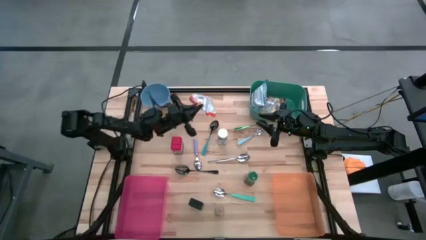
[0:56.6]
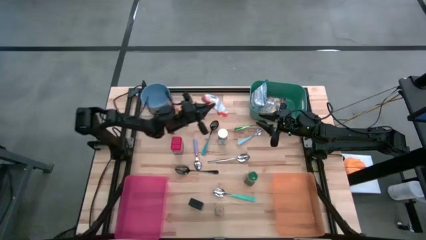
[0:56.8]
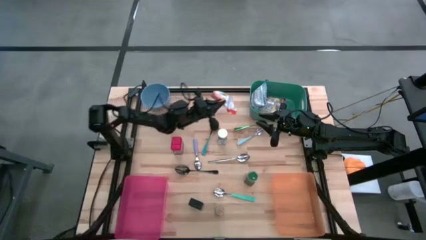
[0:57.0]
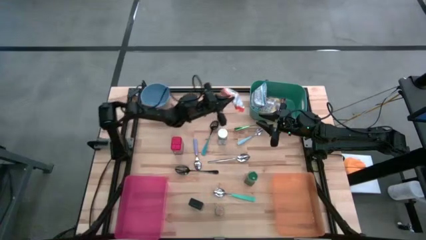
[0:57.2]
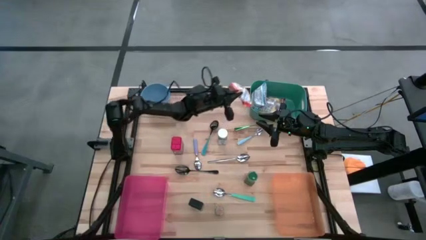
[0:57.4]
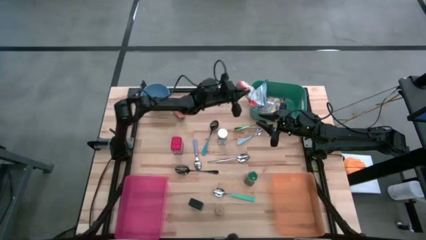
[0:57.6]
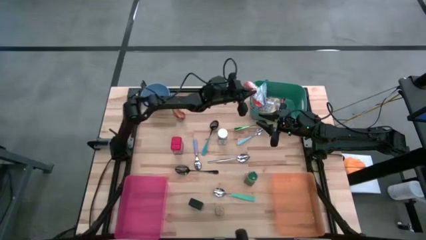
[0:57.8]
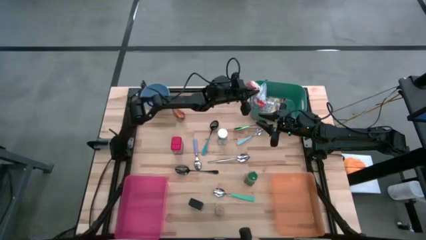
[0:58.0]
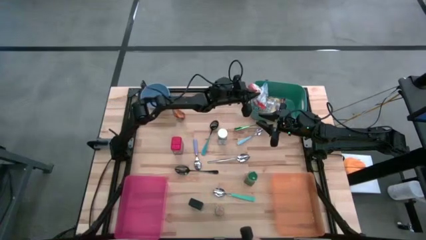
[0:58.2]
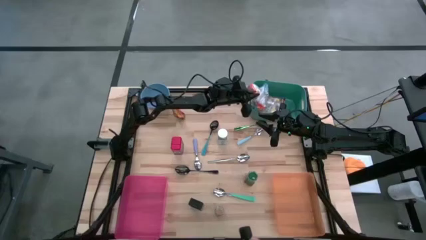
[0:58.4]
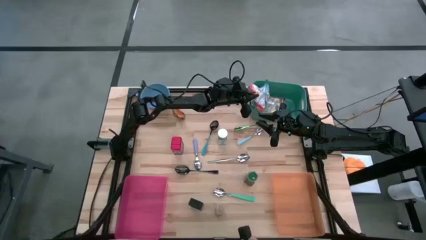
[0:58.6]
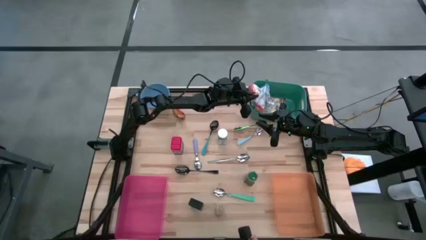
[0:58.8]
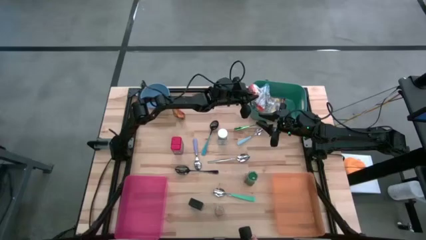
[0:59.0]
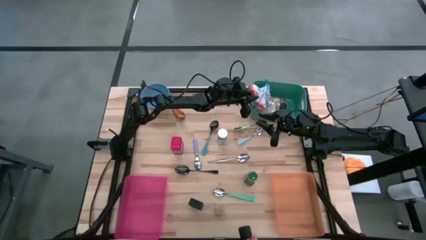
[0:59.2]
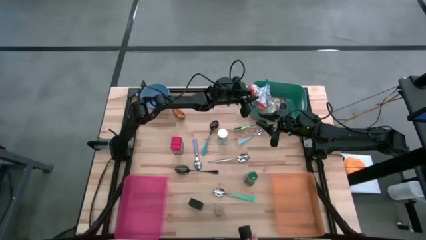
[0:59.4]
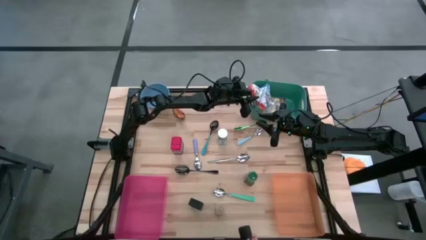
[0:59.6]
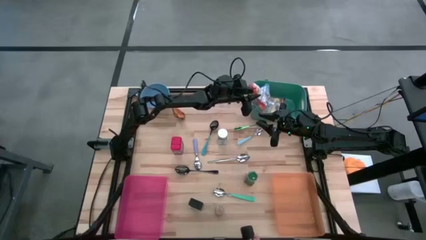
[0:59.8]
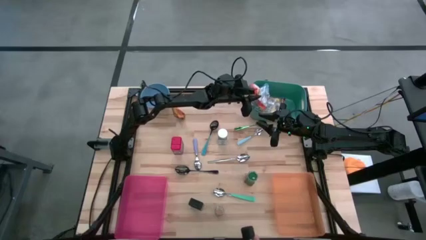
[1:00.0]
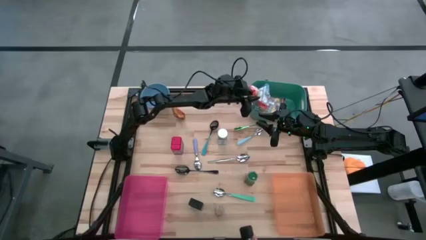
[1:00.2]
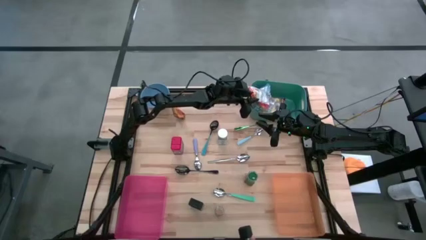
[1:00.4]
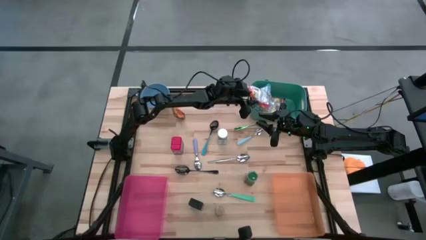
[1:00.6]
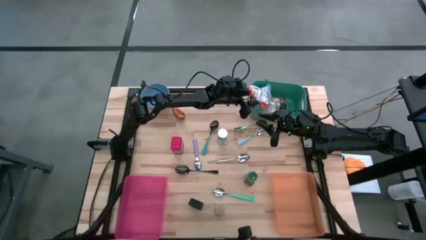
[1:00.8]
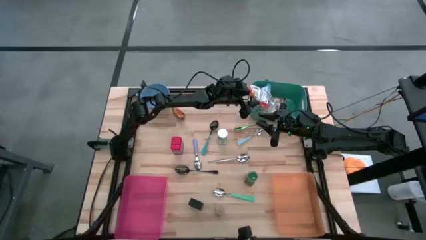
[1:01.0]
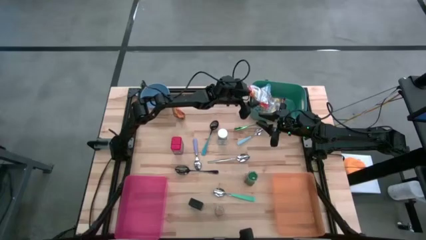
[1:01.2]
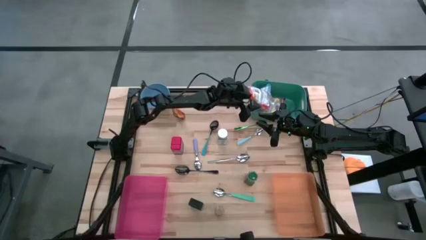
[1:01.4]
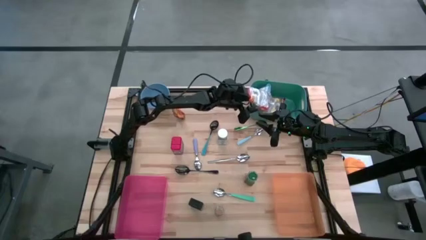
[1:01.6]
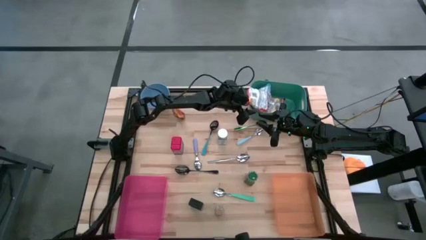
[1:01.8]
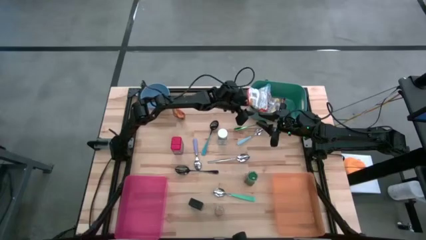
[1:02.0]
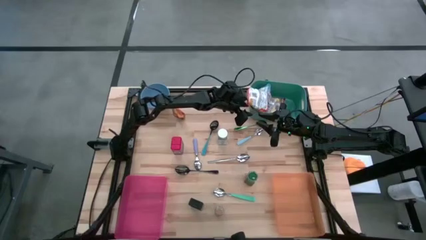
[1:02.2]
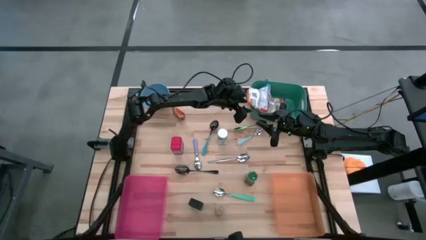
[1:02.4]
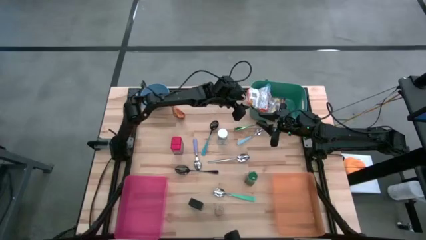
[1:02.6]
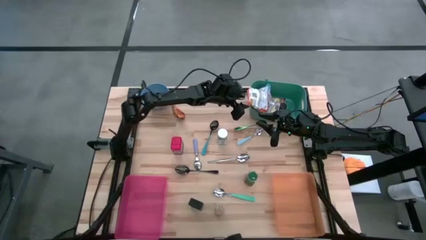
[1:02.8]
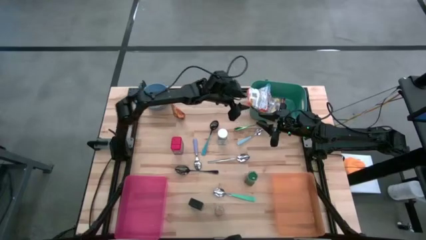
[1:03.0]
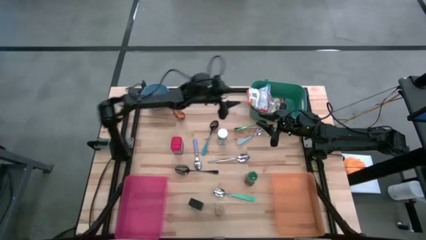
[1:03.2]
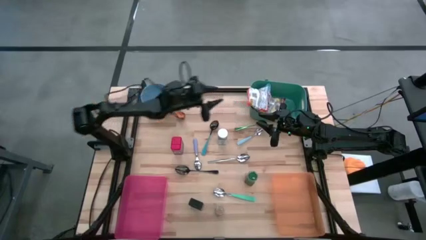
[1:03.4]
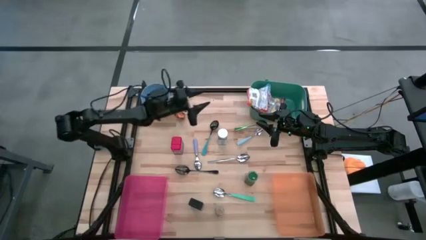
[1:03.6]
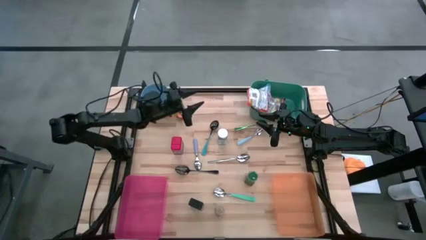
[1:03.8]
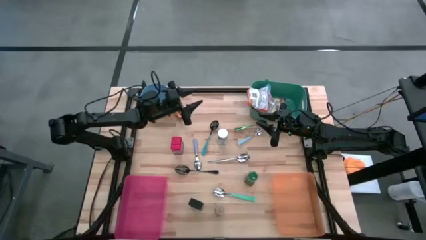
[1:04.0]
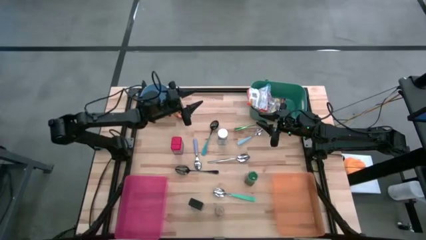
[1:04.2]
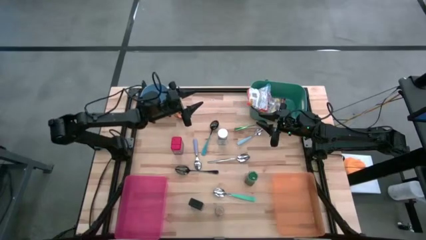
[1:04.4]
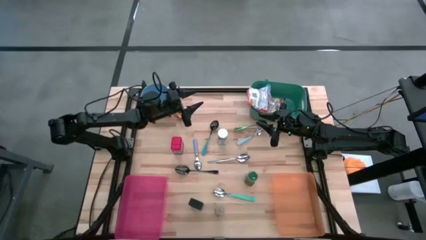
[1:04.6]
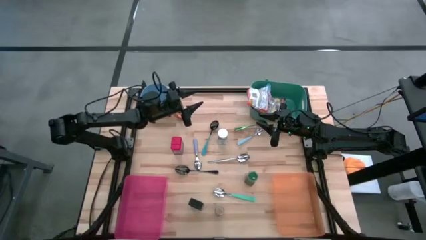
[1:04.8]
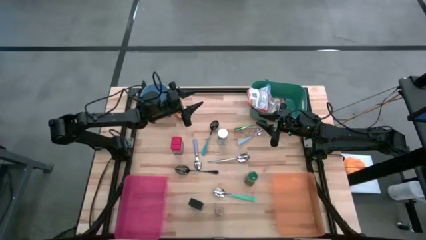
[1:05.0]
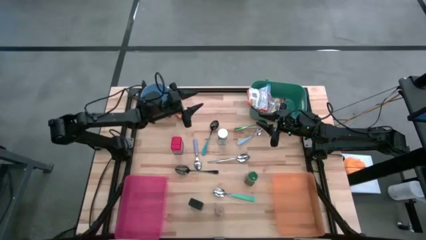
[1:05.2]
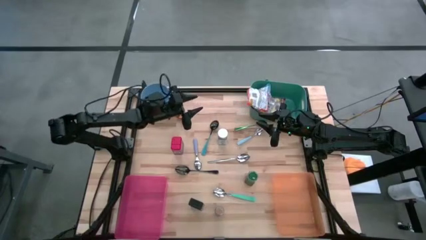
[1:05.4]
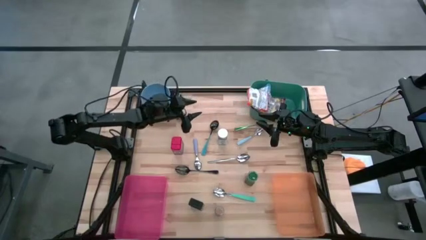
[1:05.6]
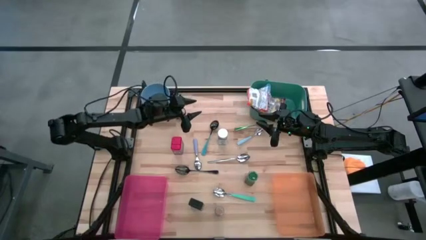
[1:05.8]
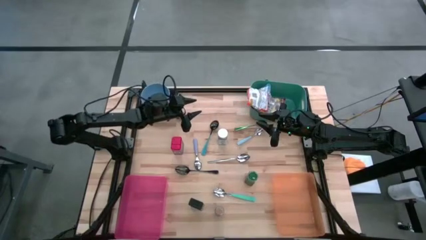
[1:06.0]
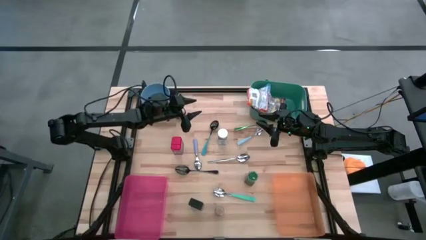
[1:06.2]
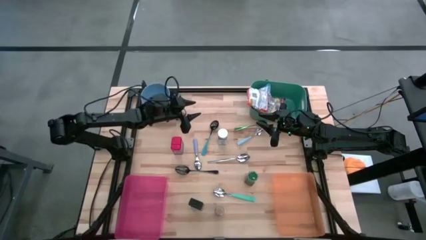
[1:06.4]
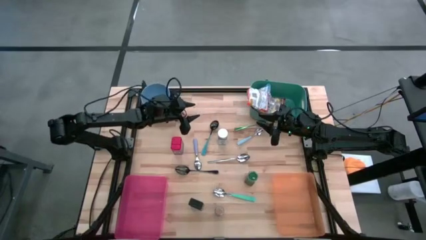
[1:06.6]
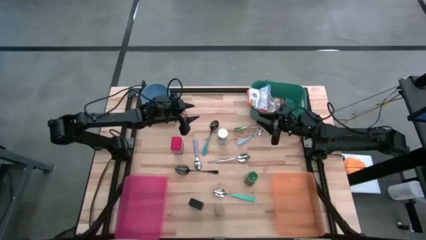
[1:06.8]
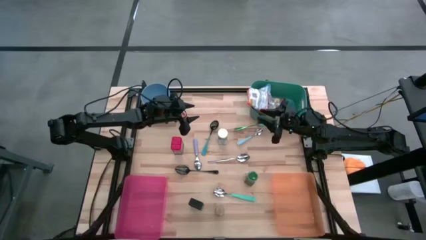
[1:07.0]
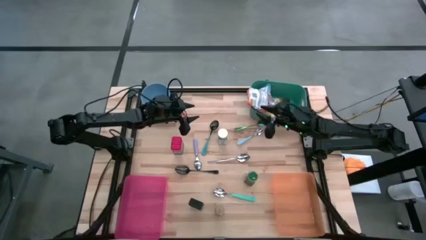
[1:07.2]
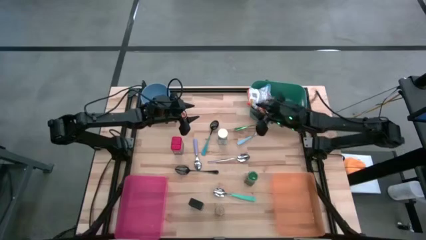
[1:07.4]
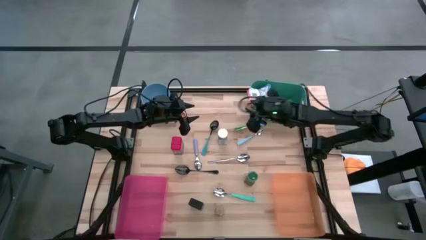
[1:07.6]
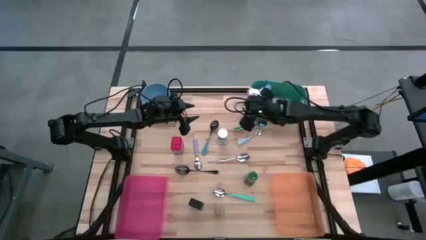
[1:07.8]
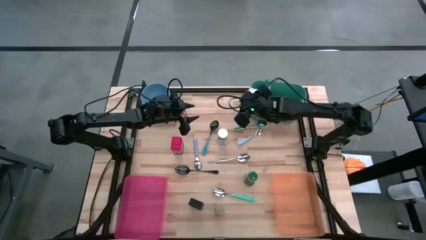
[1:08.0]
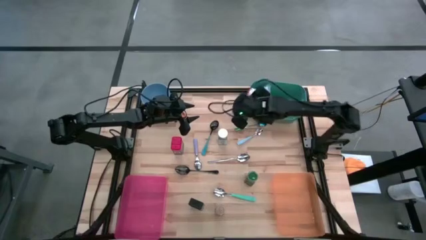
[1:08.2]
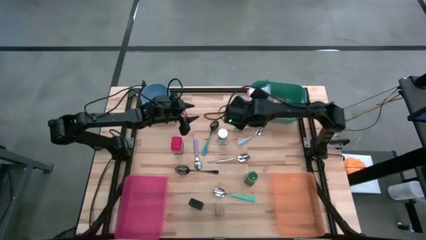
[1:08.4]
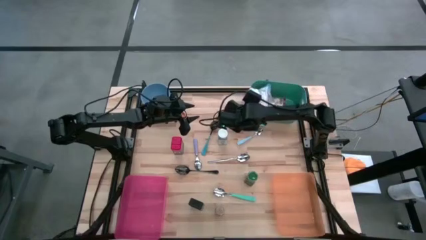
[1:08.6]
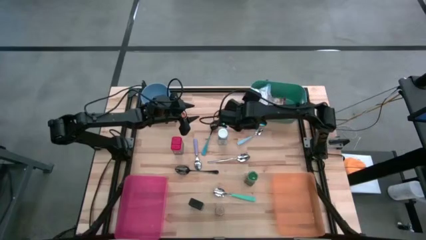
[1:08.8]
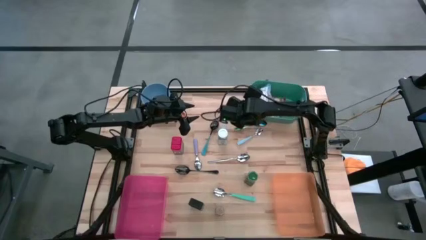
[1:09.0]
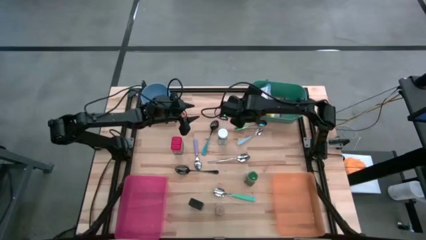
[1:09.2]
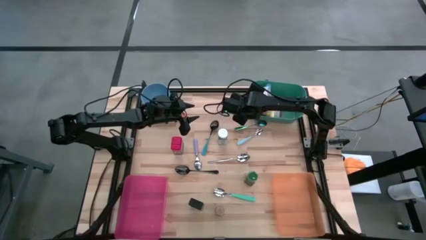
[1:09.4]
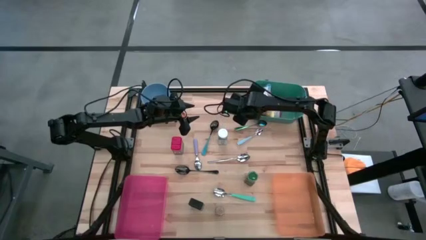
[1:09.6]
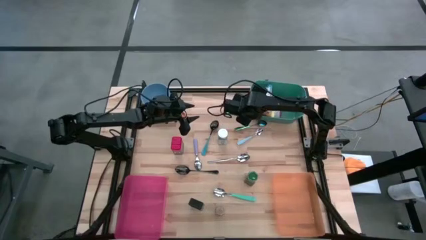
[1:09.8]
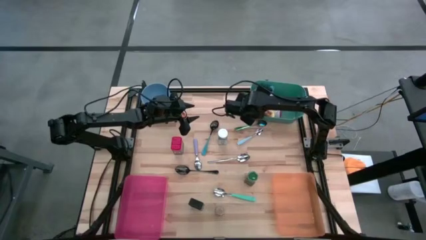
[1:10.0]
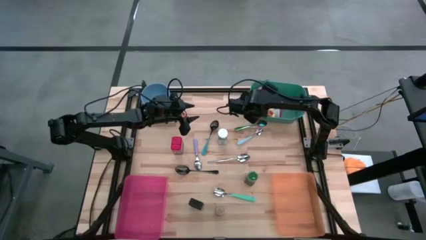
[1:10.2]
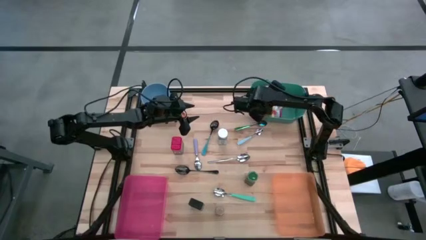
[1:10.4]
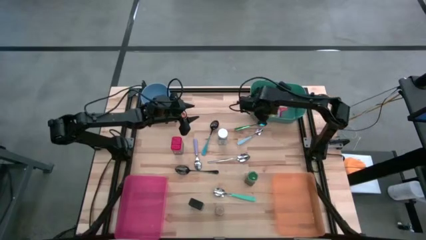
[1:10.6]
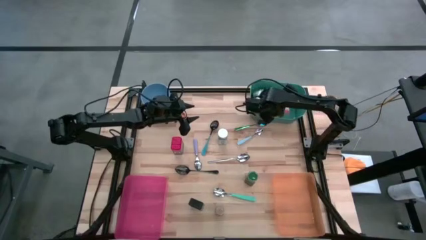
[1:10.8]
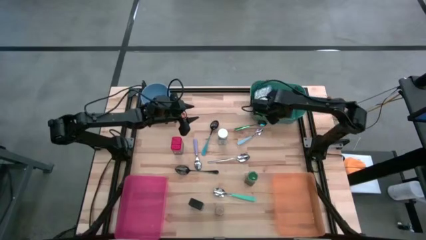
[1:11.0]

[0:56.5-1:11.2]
Put the orange noodle pack into the green bin
